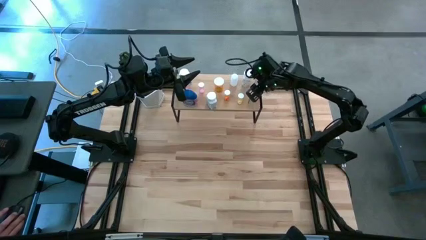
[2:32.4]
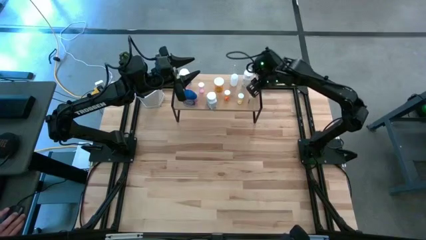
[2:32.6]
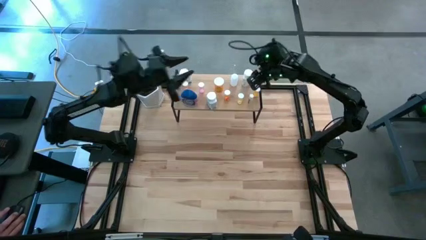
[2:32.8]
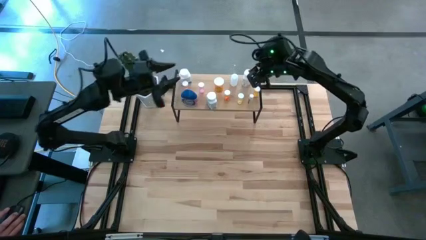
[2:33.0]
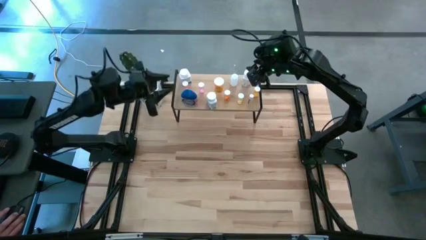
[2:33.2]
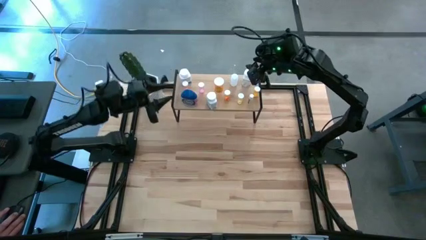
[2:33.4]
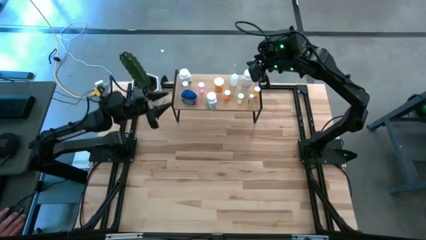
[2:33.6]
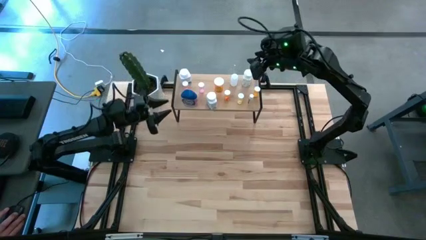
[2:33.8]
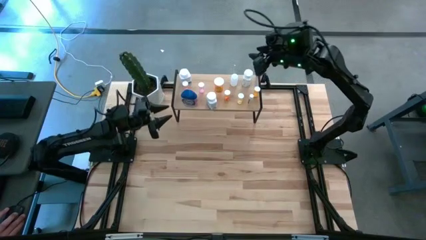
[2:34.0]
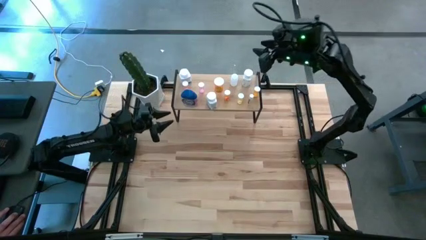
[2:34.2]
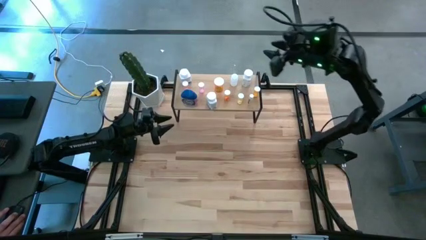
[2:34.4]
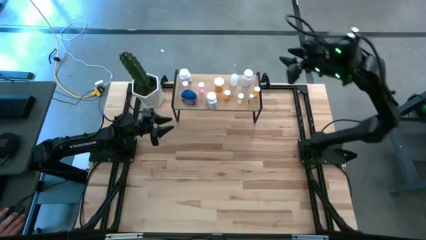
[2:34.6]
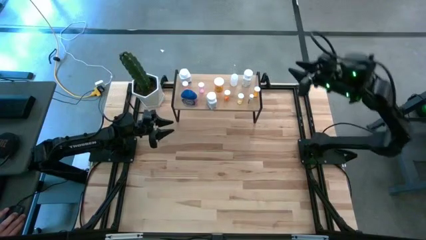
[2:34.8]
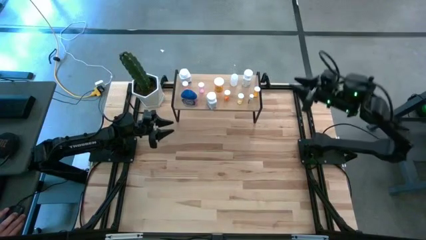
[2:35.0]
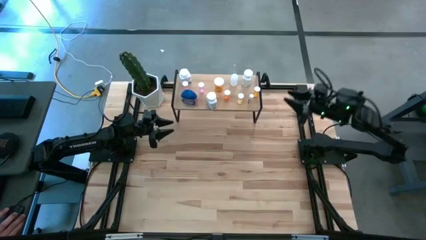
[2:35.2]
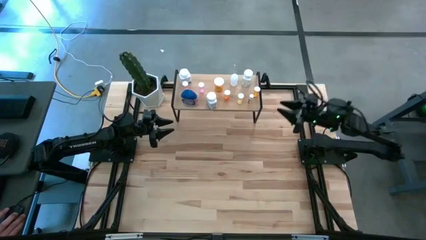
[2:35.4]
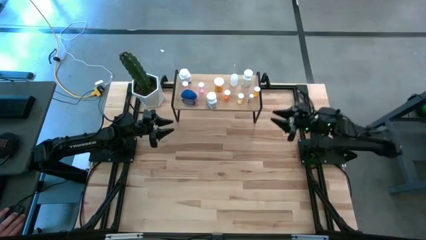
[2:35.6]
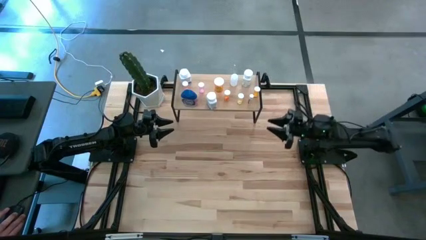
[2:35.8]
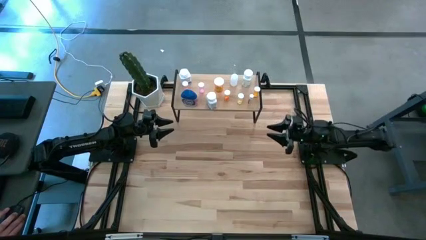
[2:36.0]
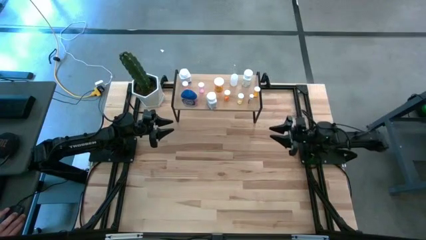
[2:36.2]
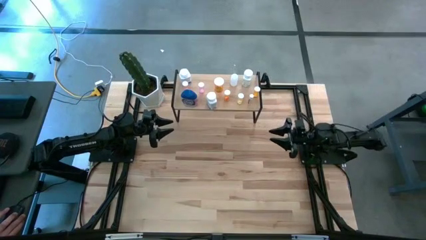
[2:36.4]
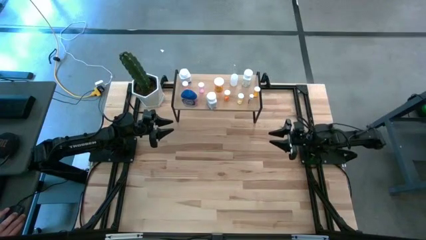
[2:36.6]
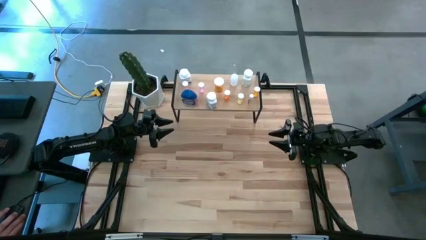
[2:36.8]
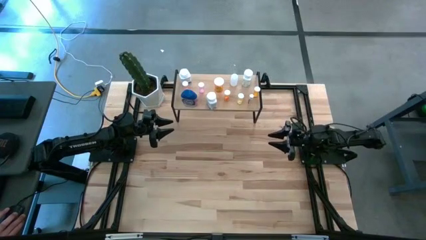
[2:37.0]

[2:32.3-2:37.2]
Task: Pick and place medicine bottles onto shelf by color
Return to Home Position

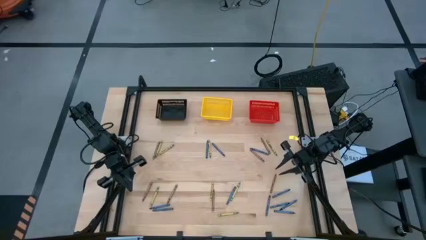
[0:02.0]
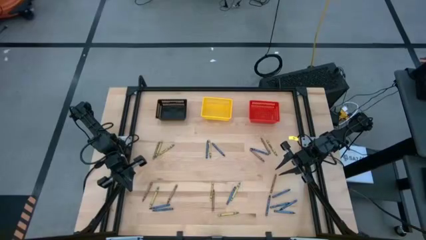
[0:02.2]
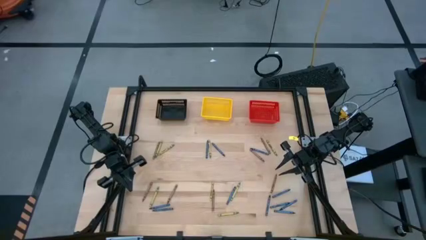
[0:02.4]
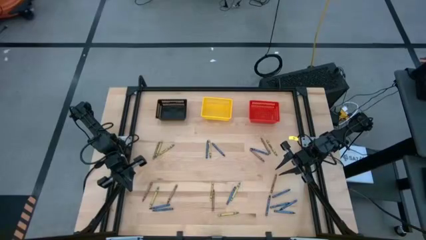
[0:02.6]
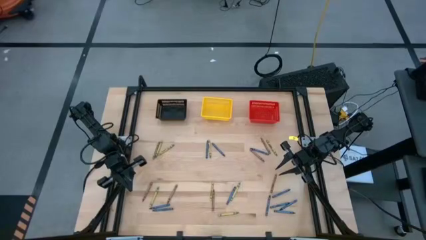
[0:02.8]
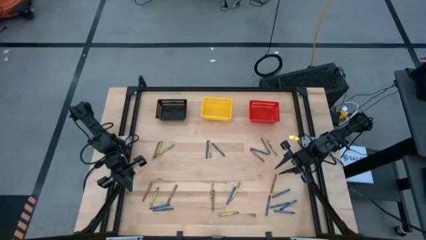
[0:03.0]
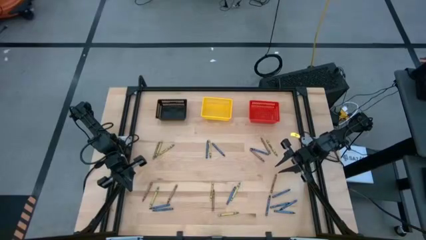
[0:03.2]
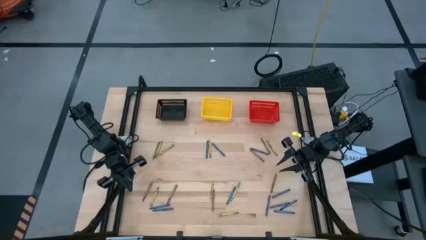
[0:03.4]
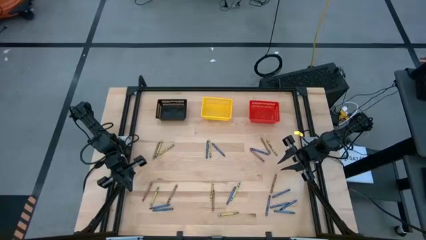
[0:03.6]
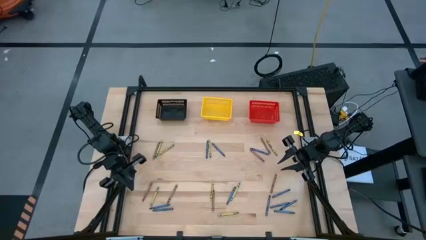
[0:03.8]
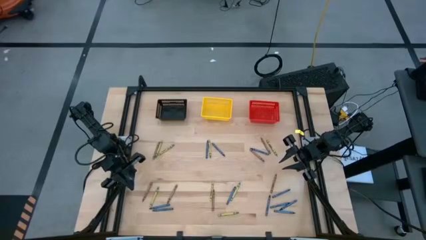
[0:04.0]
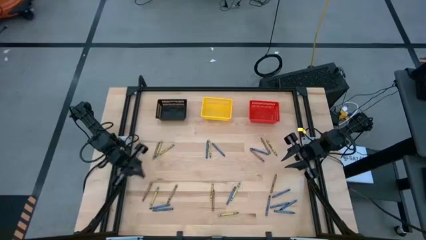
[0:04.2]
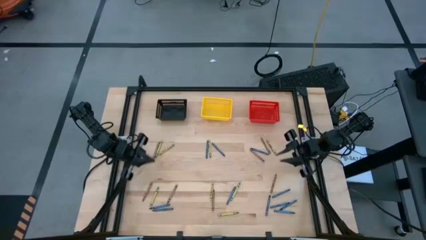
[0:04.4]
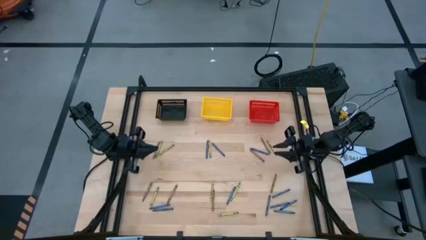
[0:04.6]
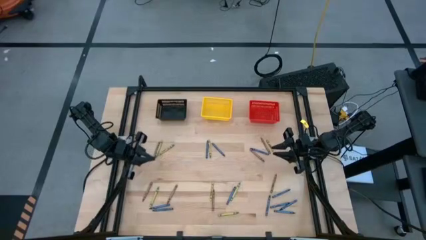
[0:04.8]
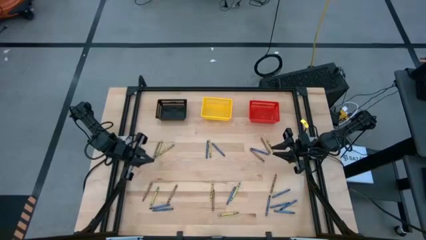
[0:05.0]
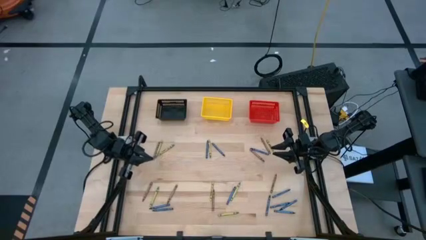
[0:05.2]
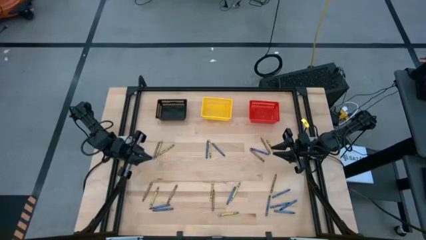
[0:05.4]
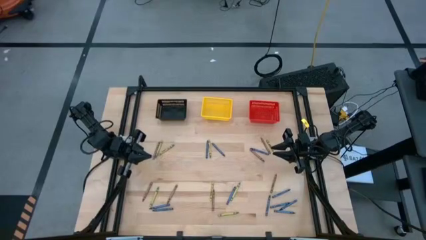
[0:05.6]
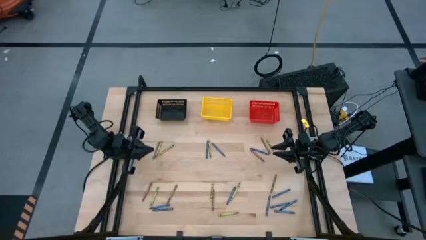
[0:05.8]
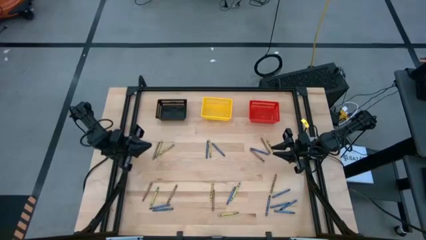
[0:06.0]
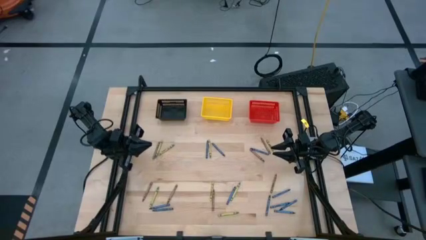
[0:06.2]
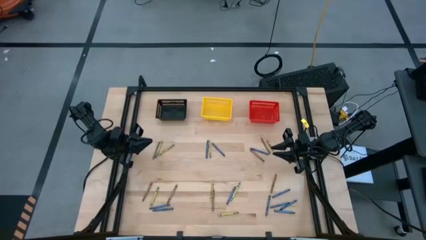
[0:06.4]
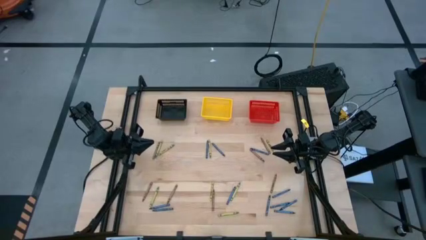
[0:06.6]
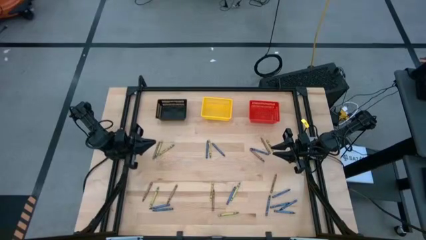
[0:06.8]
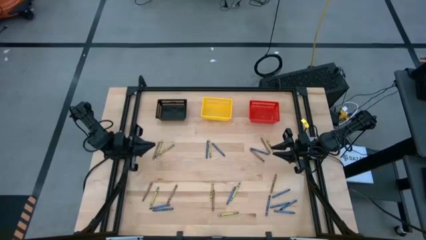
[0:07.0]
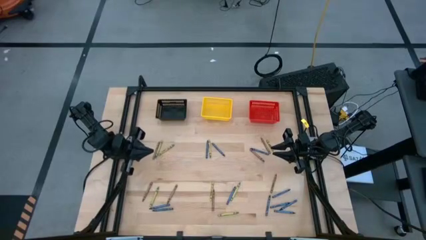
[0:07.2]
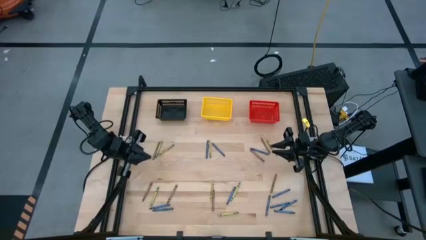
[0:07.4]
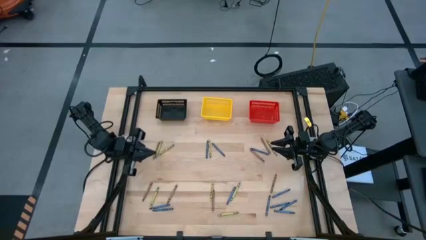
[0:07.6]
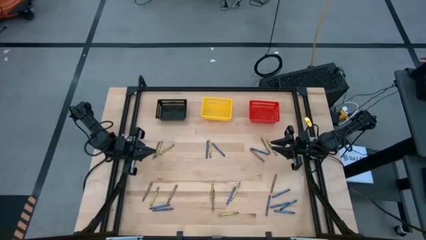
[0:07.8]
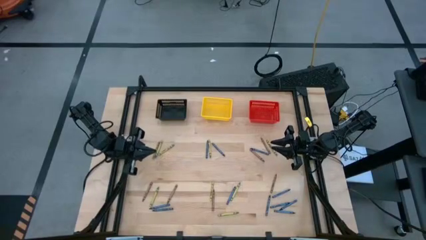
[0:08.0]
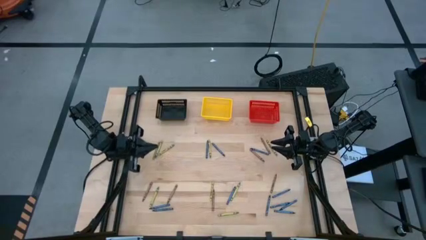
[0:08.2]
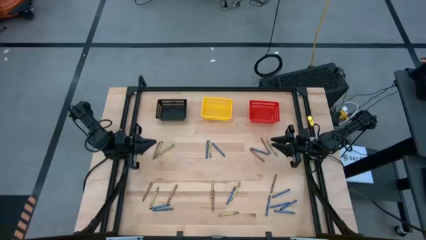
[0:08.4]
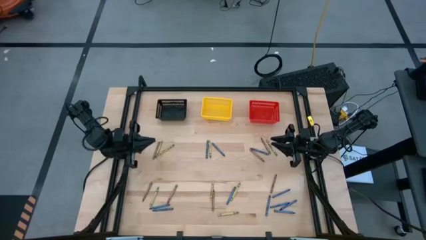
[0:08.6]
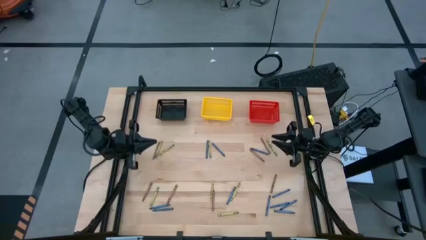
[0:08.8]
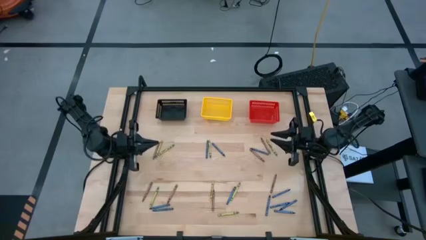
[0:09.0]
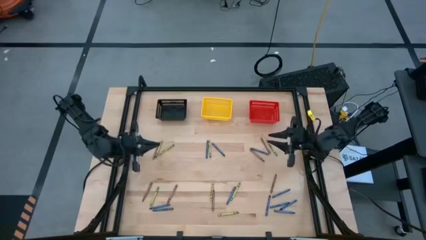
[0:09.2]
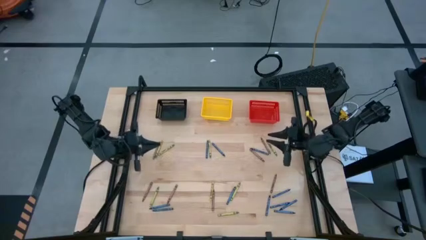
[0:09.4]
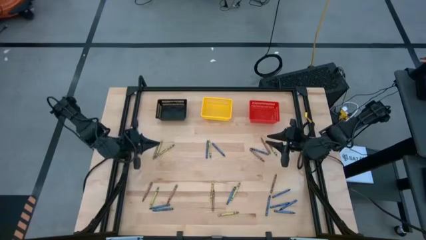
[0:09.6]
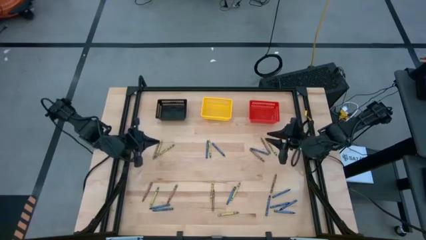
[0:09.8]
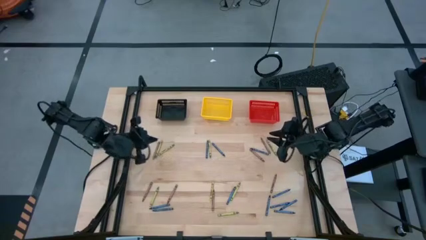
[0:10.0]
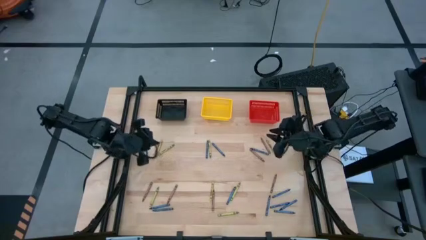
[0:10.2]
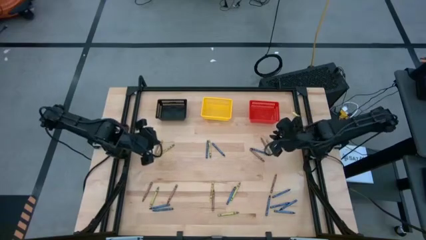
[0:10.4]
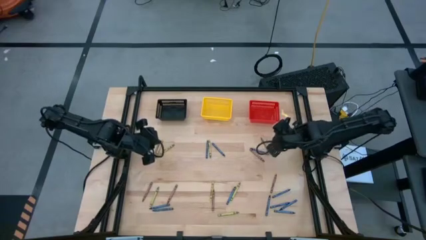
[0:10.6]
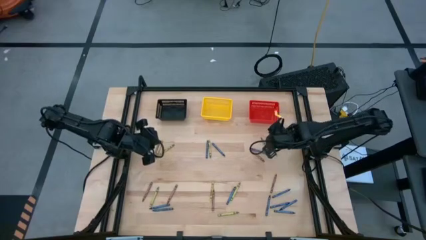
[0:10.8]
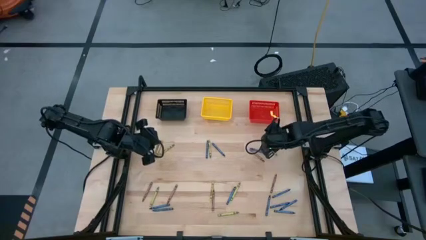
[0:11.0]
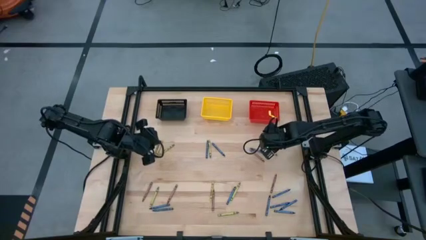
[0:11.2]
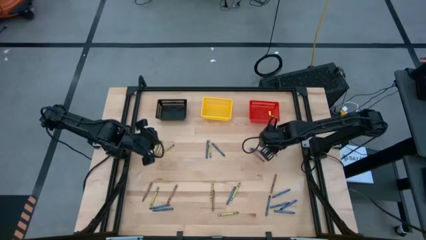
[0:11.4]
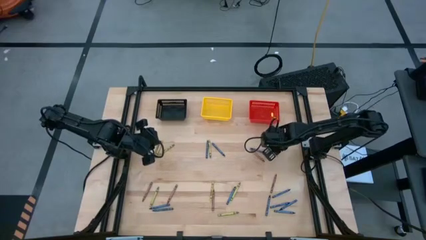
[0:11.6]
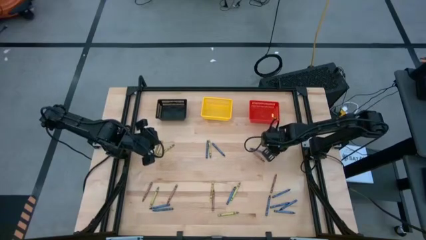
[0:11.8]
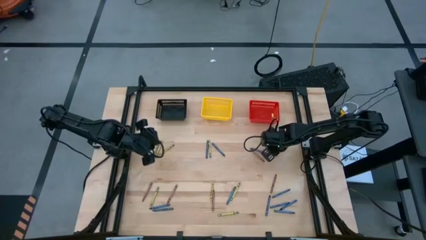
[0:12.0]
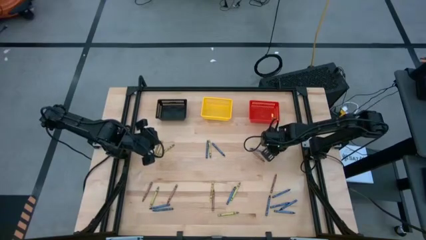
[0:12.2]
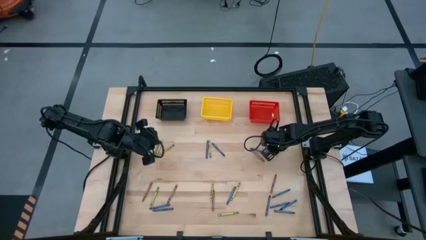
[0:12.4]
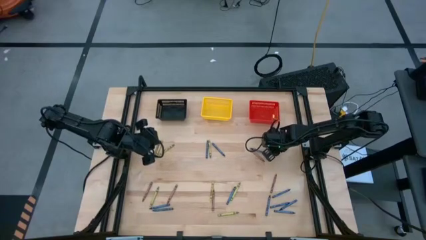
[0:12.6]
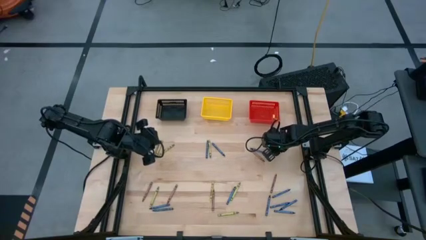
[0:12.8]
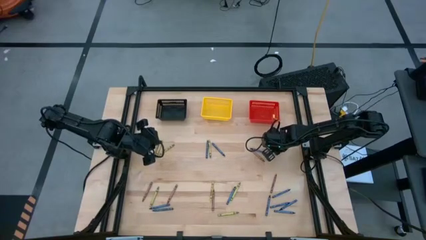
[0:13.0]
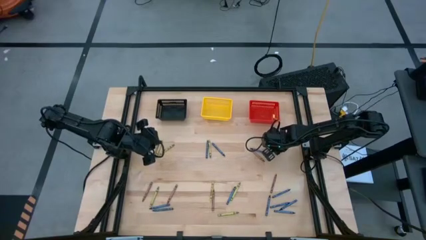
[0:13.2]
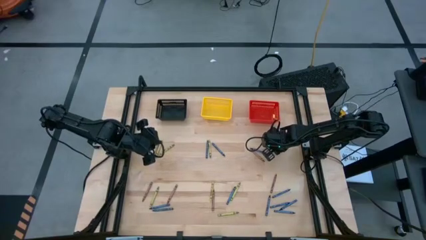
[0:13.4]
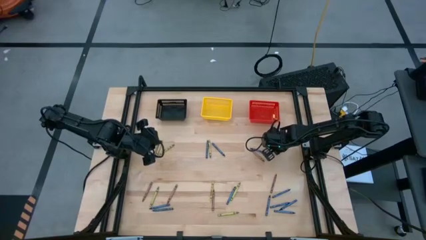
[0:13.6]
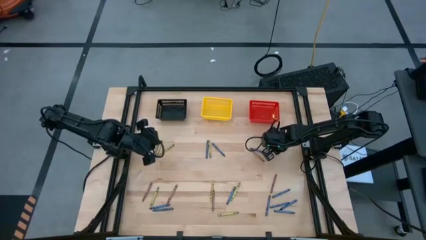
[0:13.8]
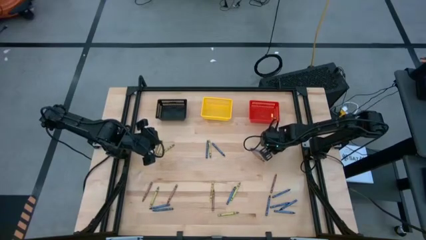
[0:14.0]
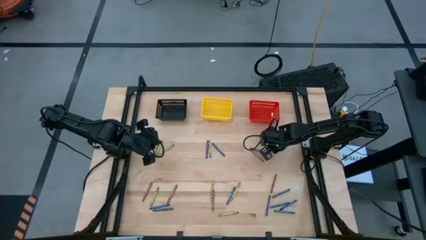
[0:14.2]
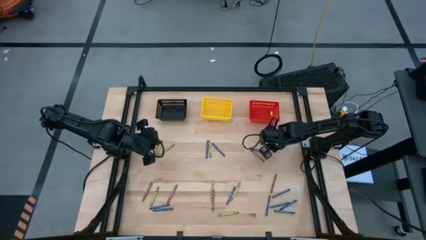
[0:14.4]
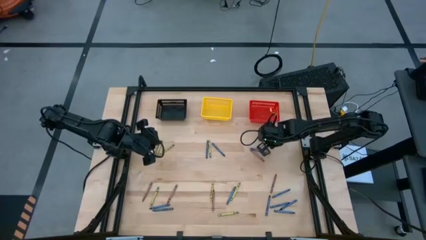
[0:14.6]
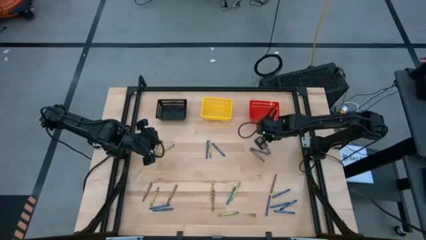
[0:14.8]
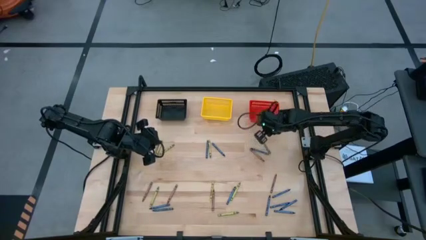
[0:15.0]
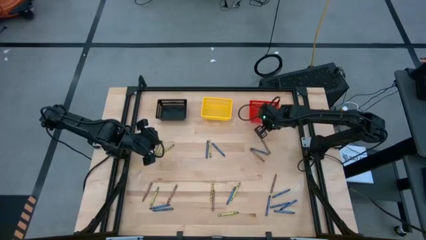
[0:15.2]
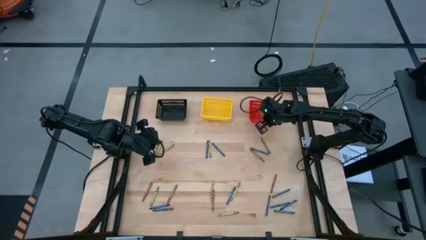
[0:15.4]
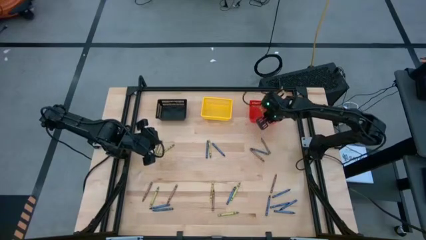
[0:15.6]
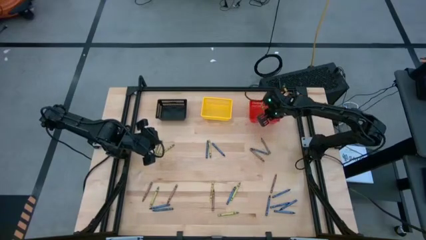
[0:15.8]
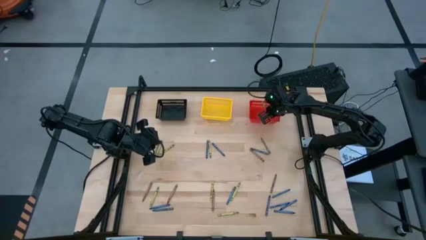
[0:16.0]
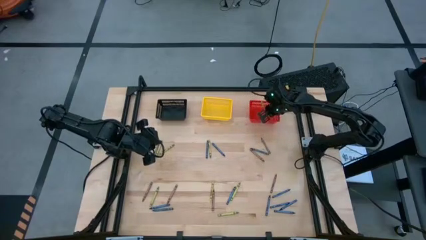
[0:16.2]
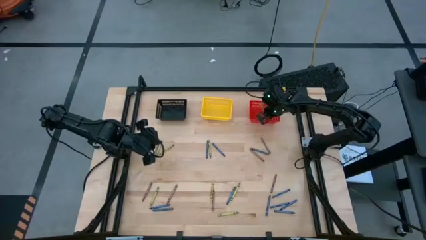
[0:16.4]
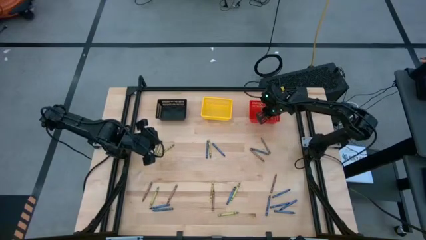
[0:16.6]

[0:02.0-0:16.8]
Task: Sort crayons
Put the green crayon into the red bin
